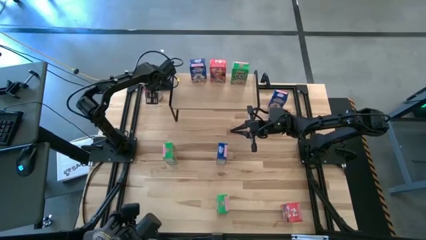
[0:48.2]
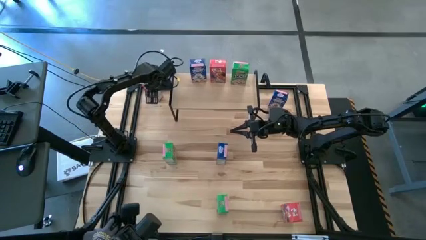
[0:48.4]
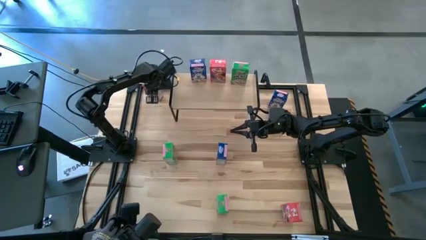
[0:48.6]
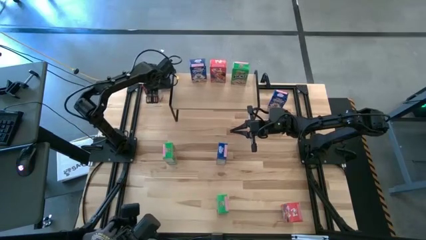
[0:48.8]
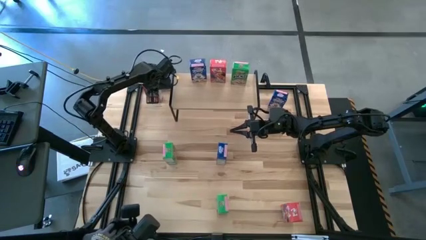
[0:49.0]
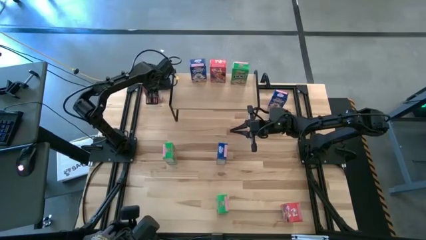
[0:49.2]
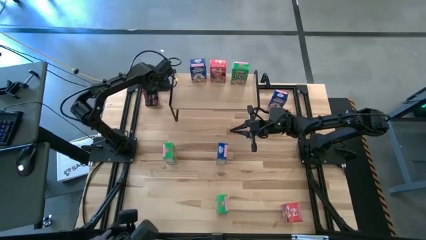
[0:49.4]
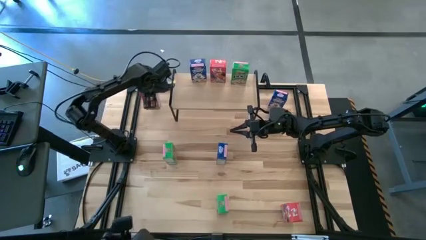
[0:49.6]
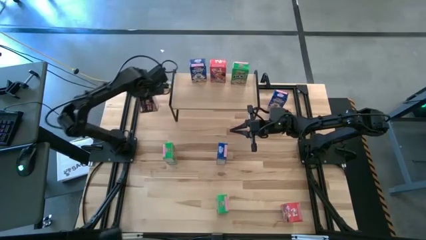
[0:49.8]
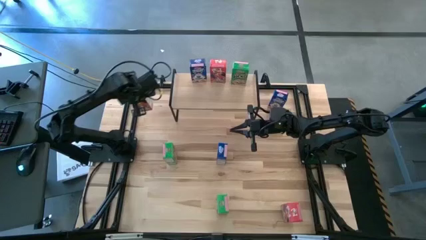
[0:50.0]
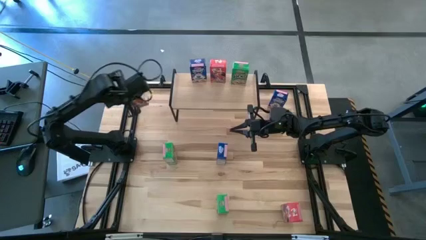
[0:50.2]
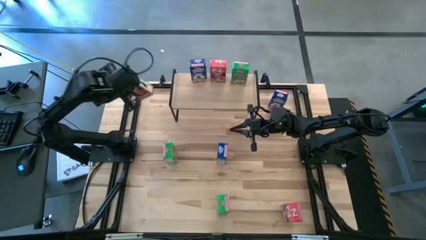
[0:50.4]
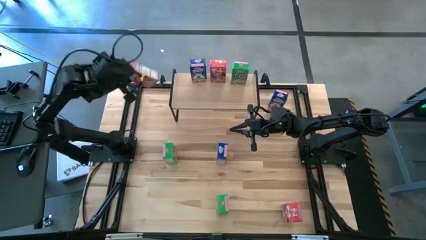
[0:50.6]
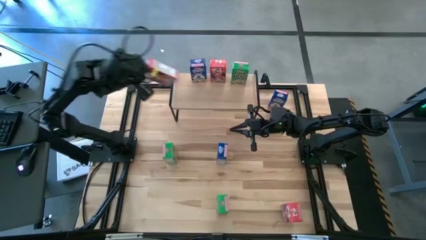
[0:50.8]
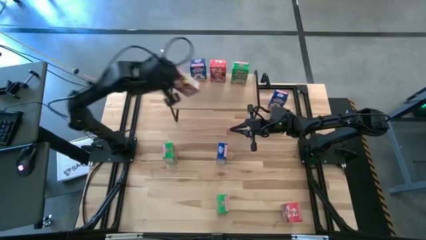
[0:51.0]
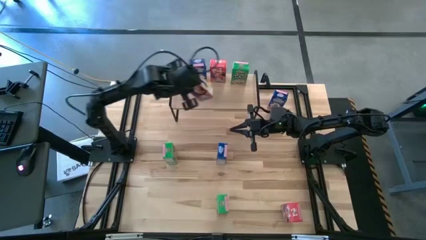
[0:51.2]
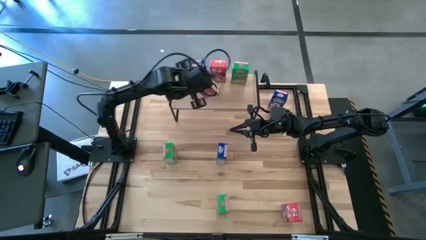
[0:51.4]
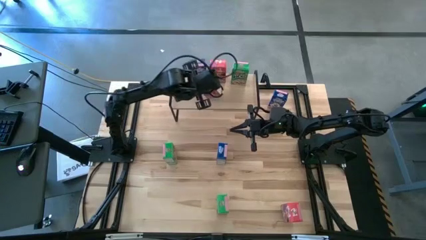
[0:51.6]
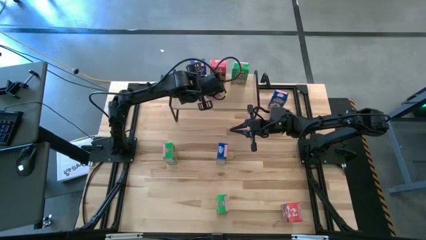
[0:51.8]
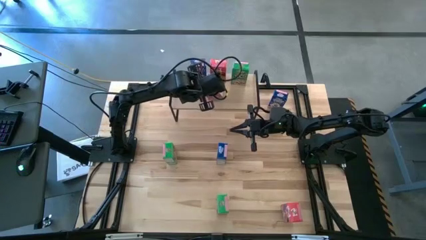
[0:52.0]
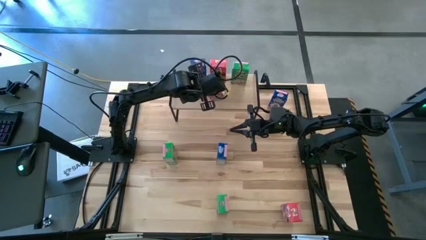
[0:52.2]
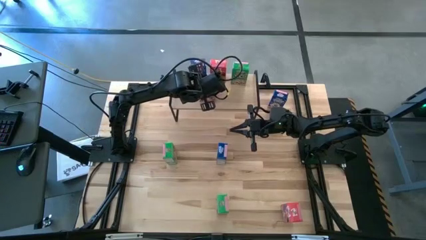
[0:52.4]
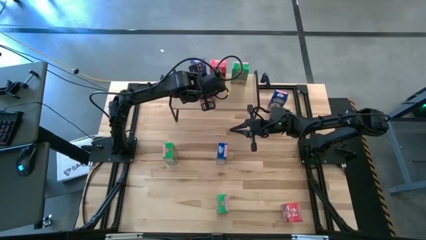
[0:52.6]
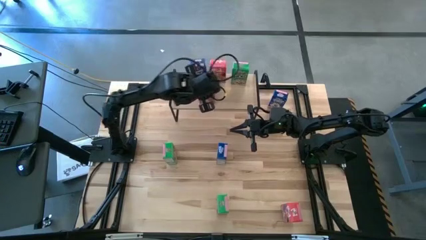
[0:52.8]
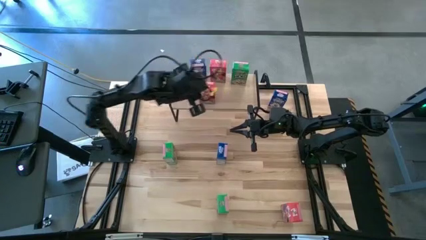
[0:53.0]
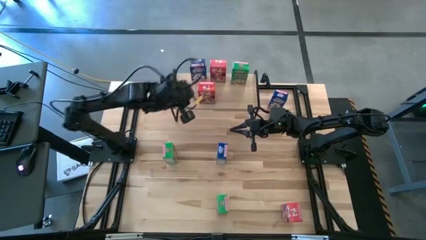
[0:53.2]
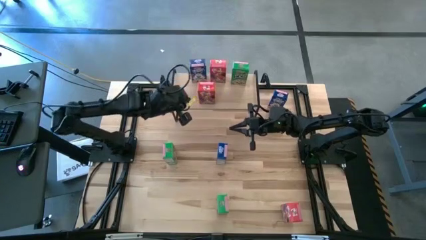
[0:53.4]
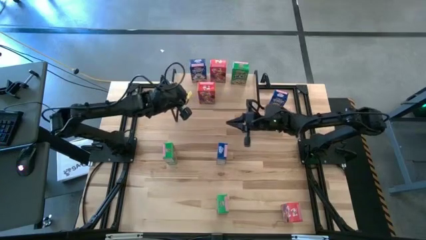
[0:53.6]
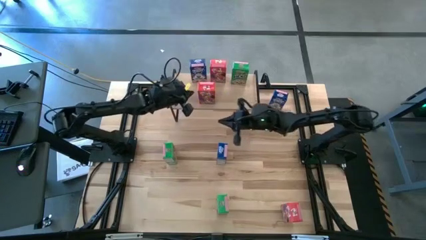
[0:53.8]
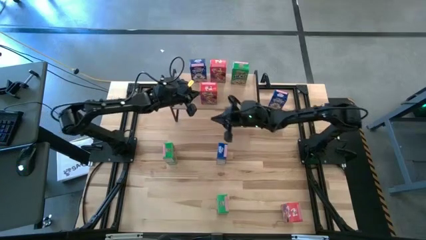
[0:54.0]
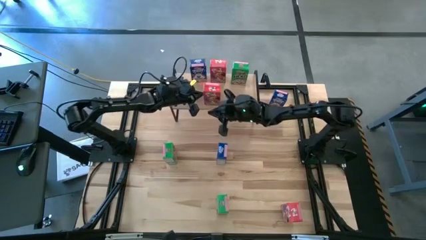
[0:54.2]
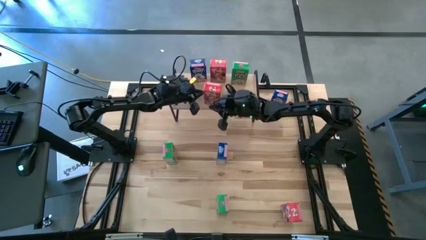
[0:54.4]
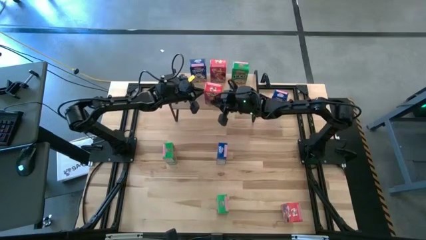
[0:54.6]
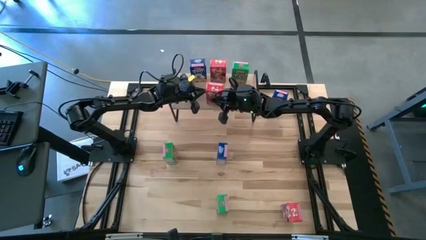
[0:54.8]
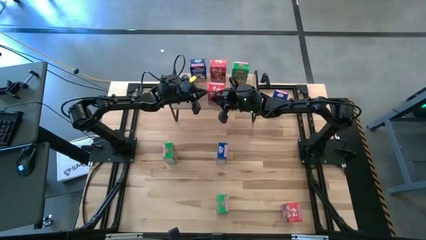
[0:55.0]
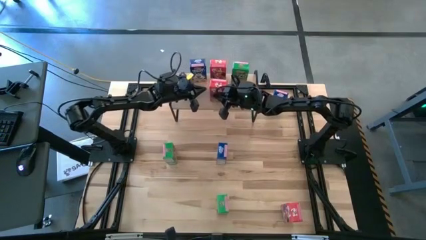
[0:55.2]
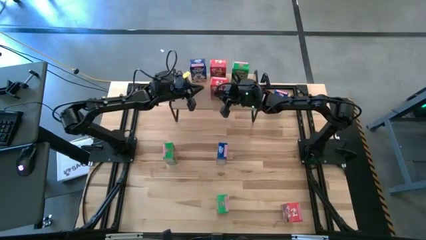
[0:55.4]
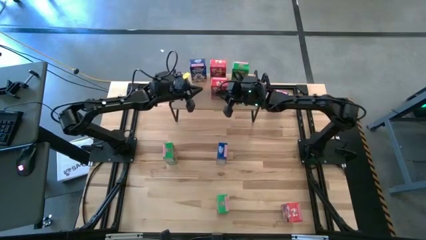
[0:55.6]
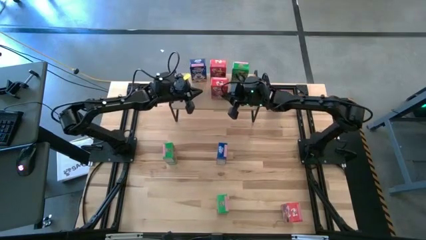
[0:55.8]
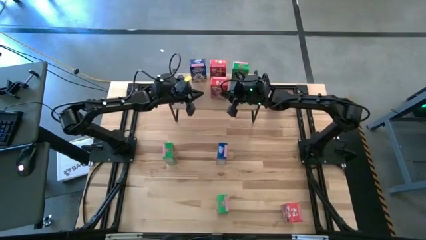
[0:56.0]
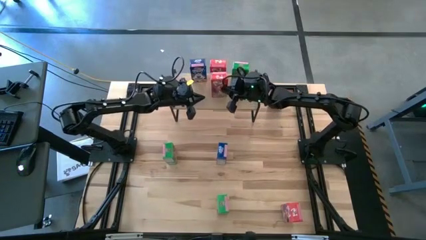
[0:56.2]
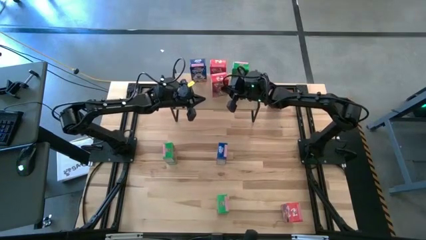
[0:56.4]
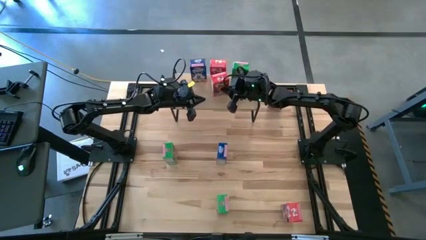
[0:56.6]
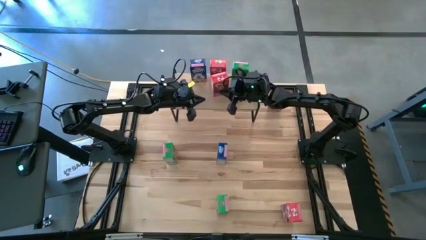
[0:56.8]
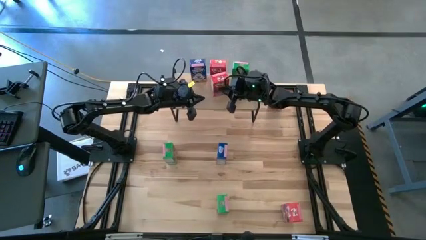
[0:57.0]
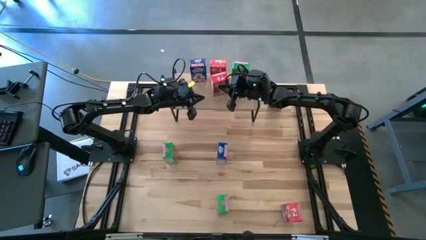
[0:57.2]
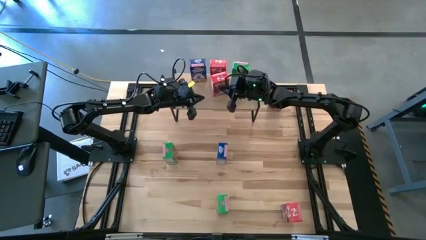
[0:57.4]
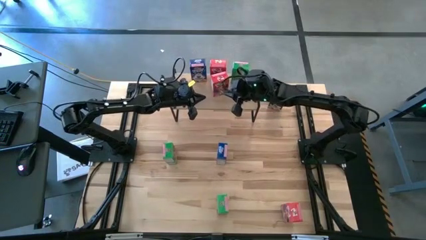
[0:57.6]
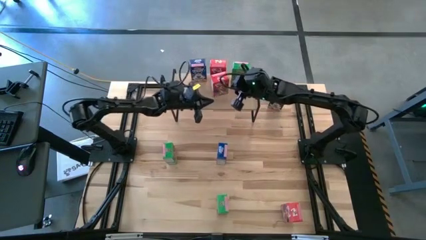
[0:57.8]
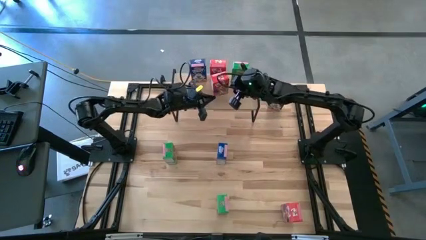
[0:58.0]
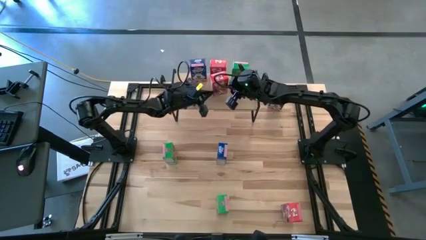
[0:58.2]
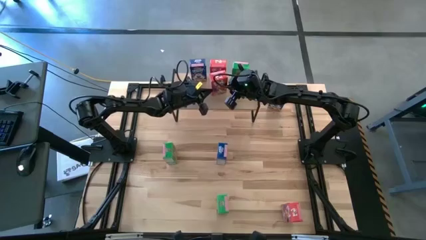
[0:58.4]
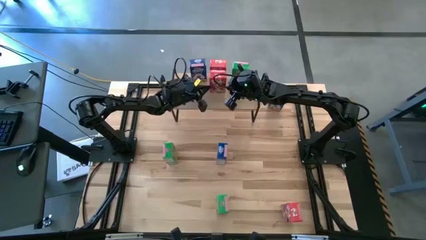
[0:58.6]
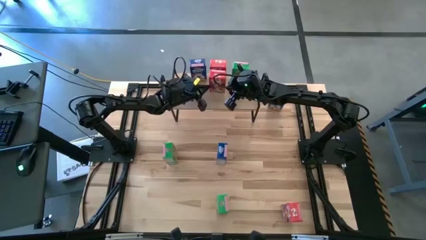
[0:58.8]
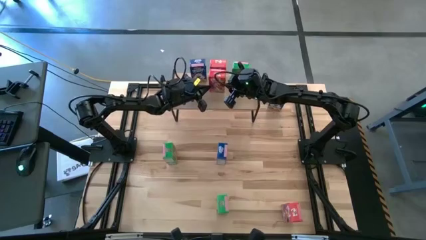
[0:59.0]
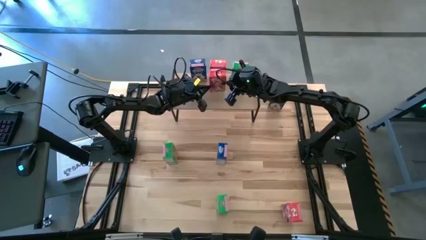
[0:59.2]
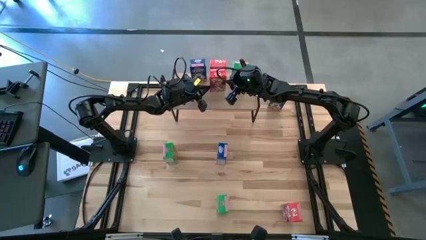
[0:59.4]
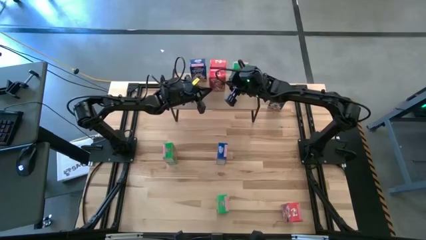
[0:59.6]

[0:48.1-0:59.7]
Task: Stack cereal on shelf
Put the top red cereal box aligned with the other red cereal box on the shelf
